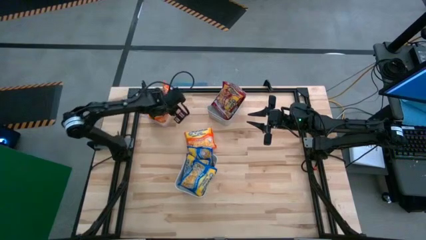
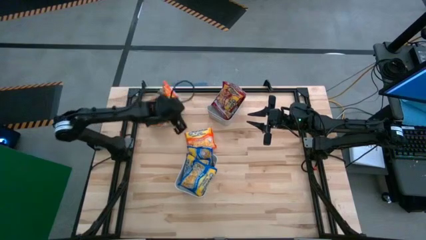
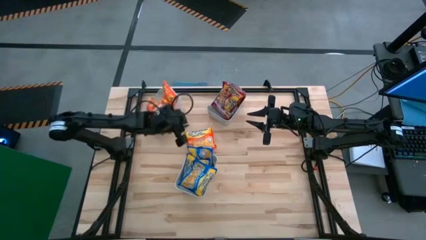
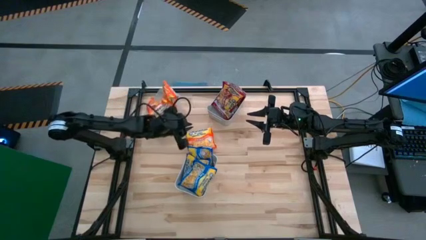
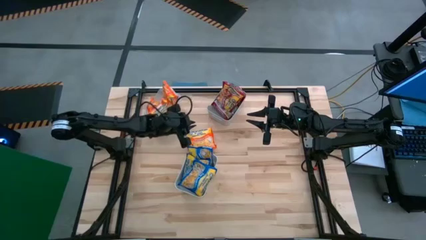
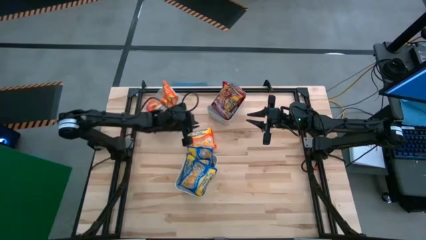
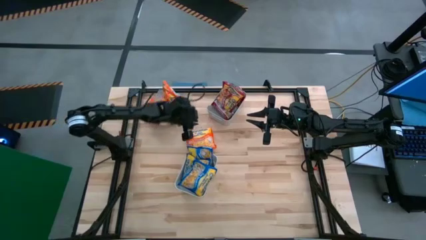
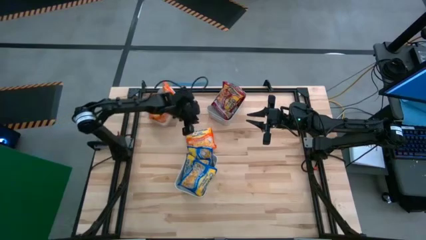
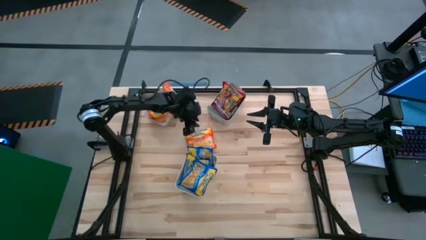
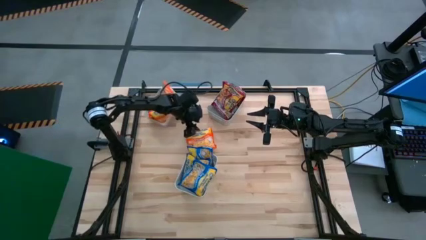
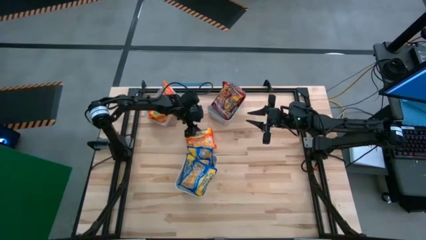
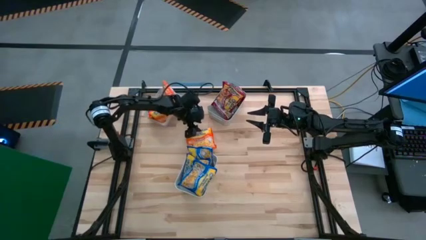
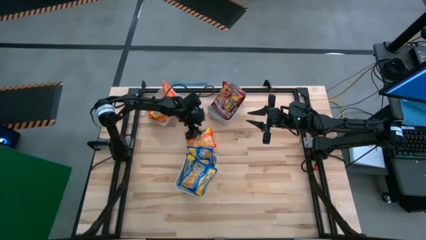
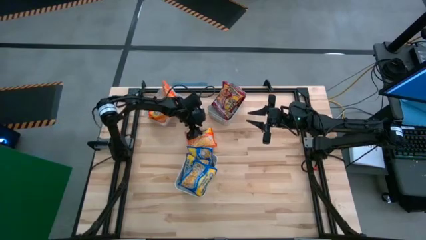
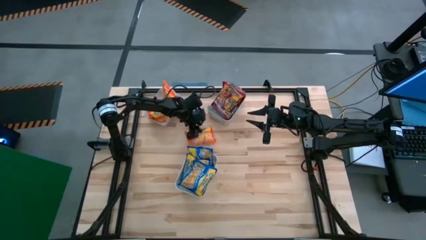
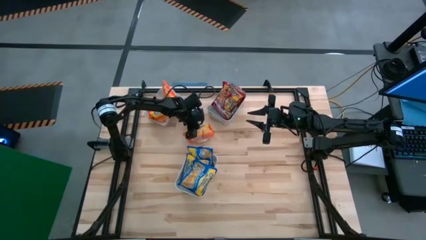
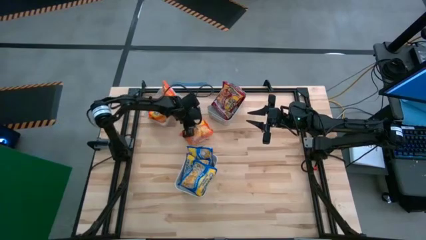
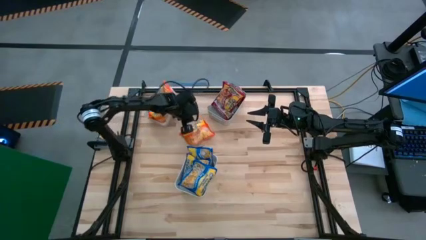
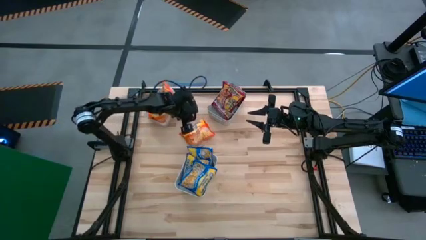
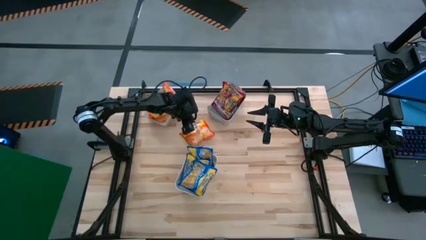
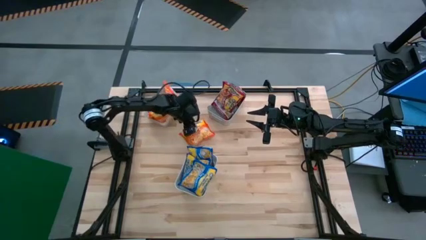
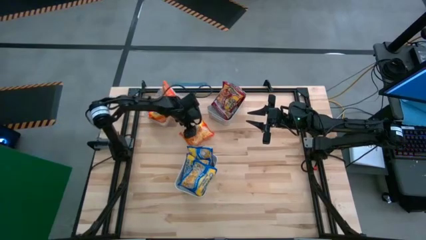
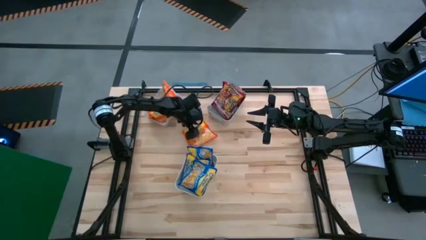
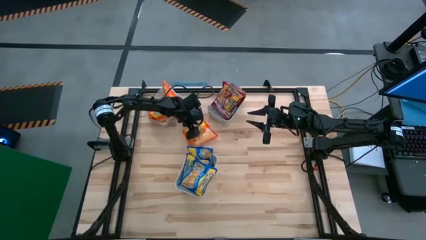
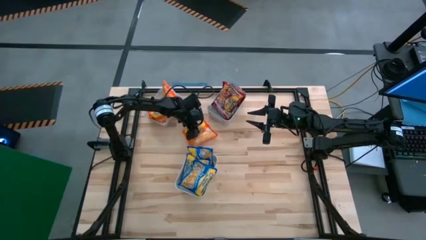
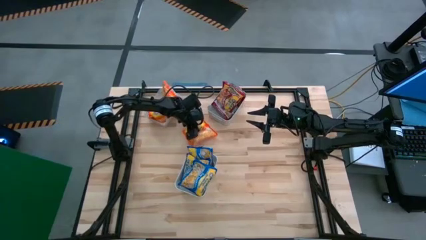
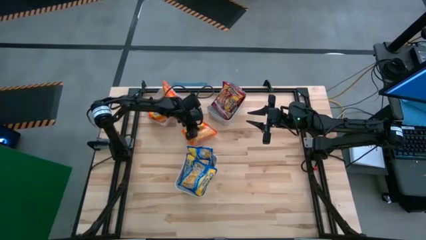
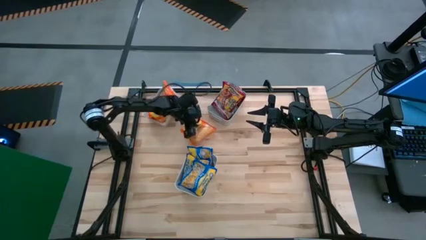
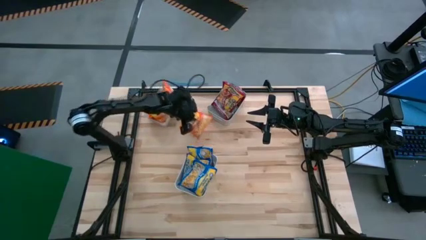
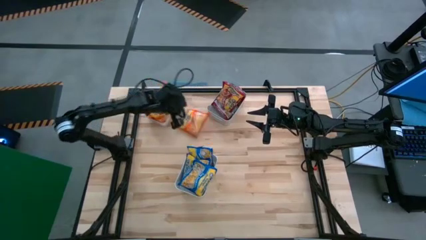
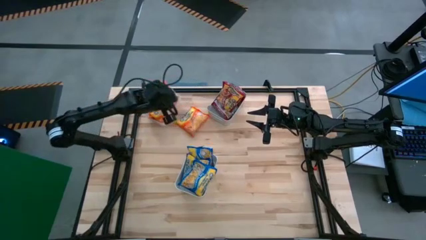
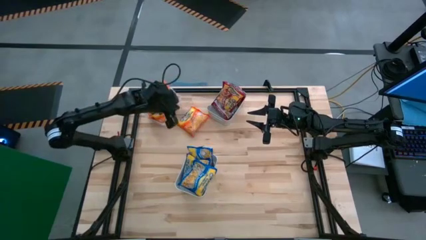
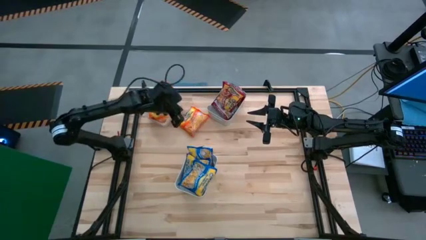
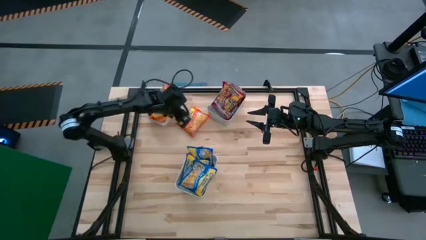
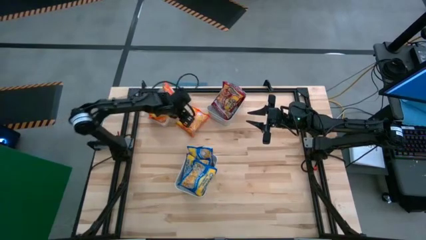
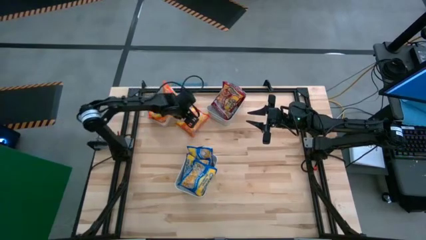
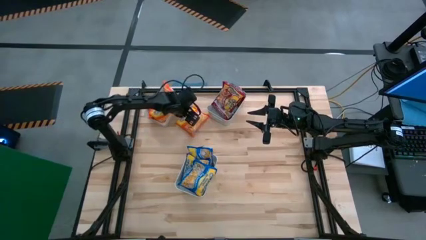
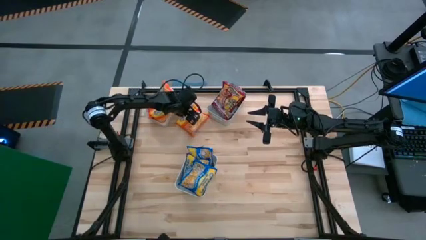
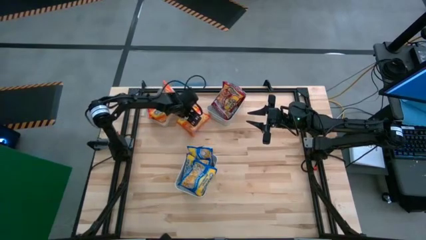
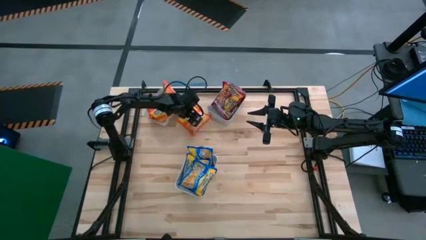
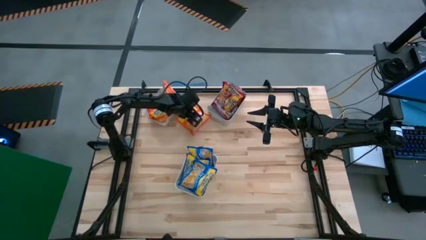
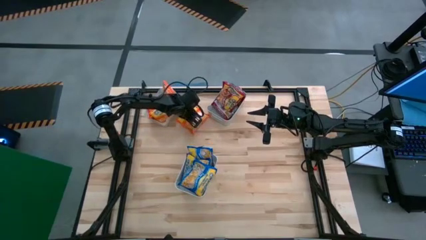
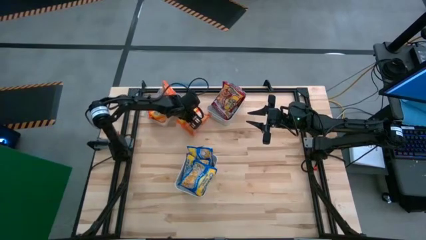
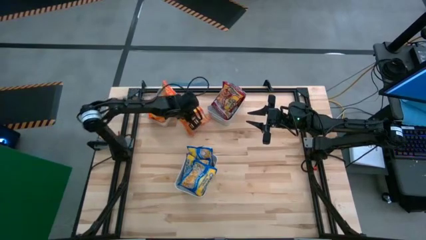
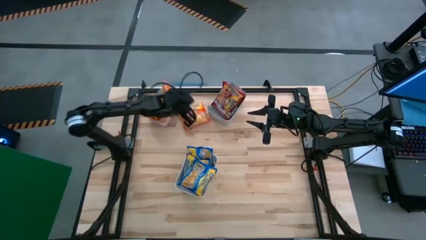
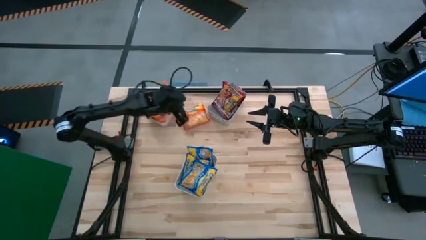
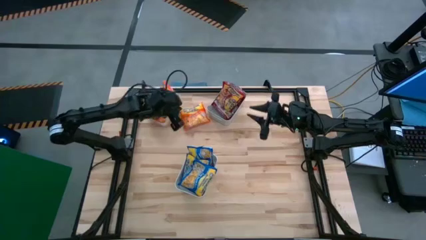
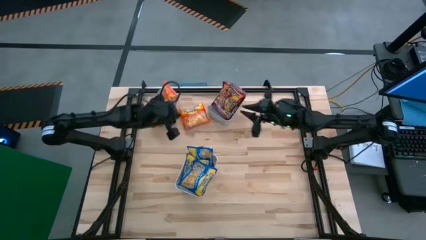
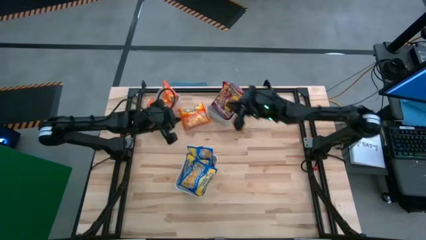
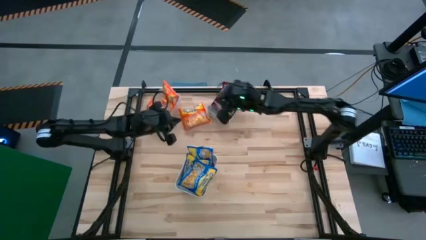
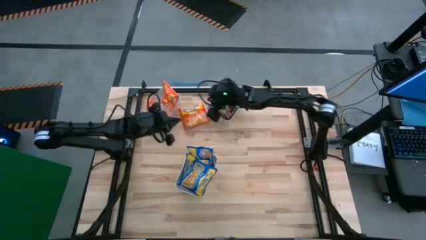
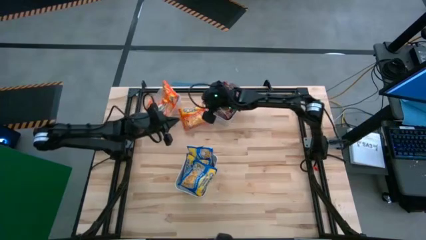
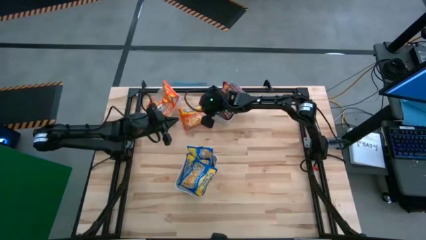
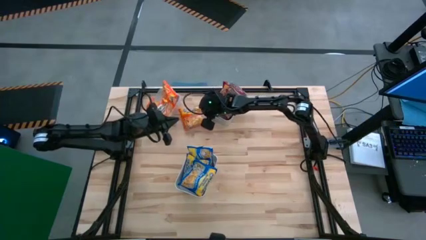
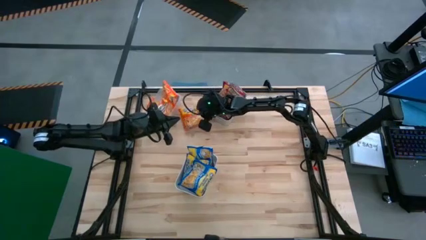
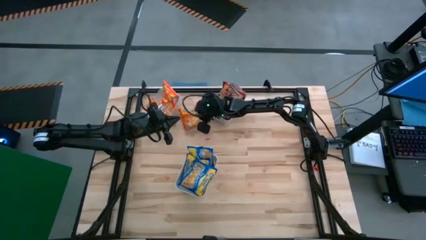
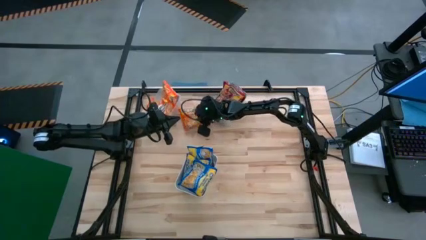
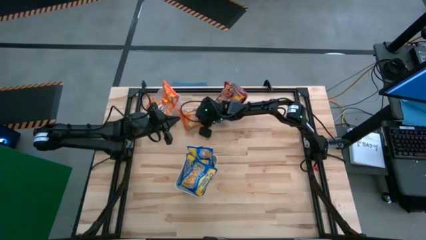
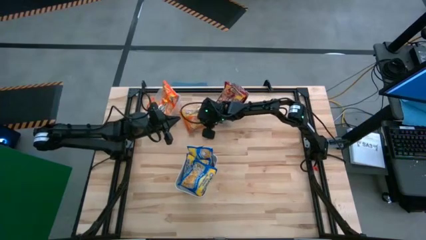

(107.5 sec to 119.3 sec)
Task: Sort Maruchan noodles
Put the orange noodle pack into the transparent bin
